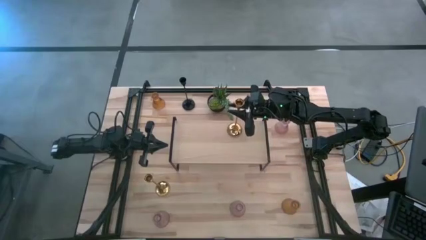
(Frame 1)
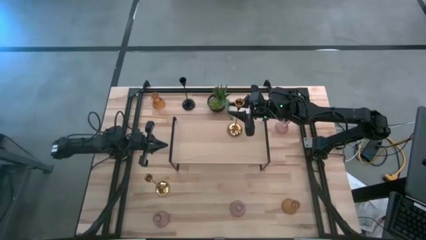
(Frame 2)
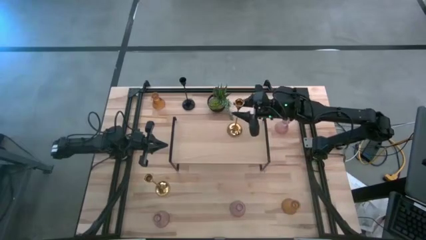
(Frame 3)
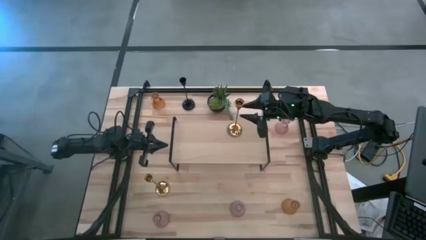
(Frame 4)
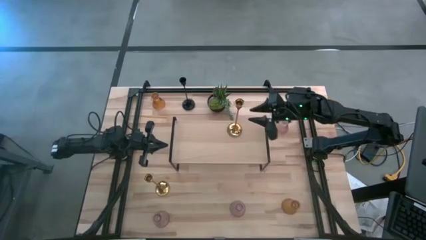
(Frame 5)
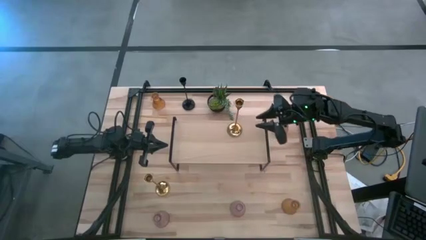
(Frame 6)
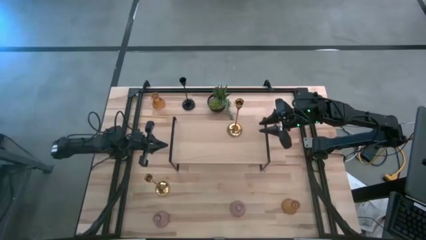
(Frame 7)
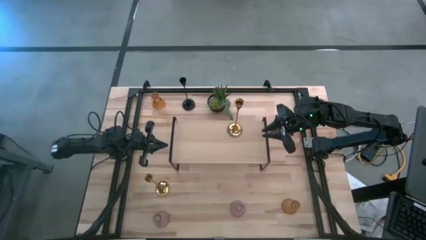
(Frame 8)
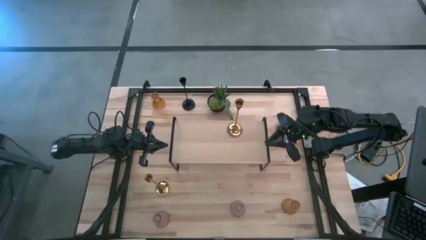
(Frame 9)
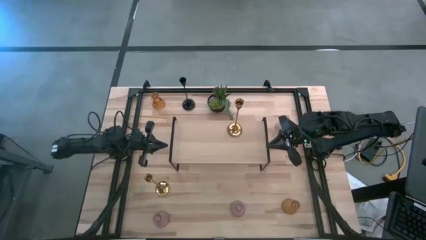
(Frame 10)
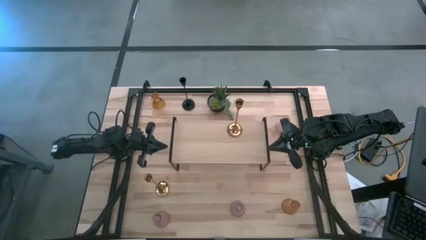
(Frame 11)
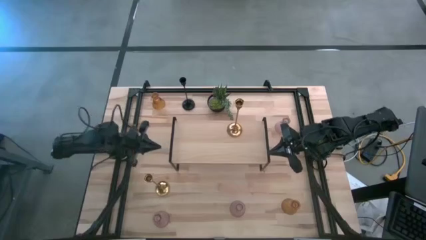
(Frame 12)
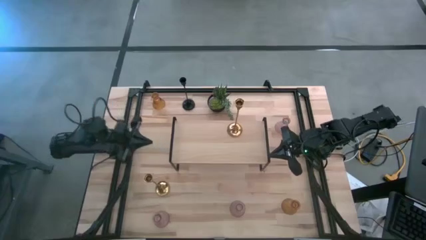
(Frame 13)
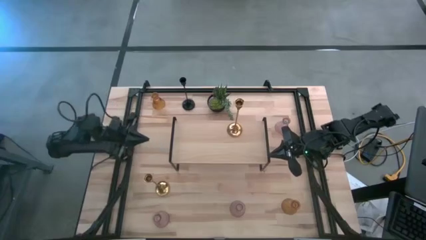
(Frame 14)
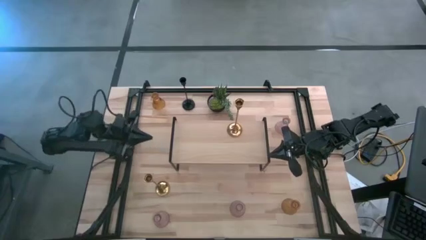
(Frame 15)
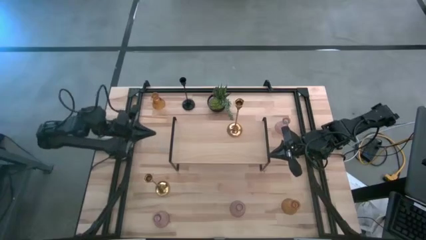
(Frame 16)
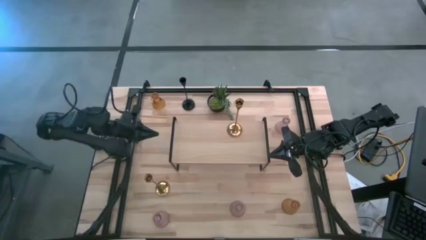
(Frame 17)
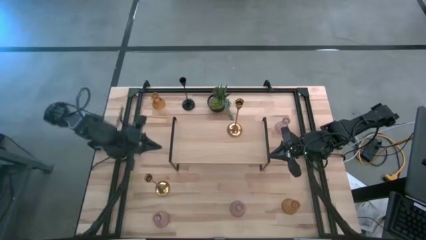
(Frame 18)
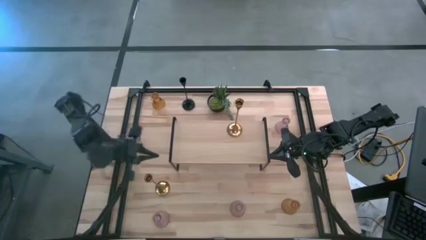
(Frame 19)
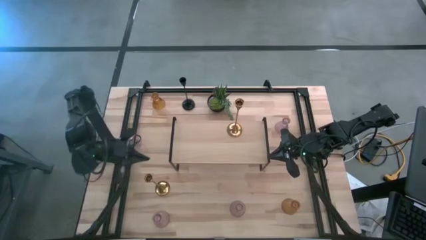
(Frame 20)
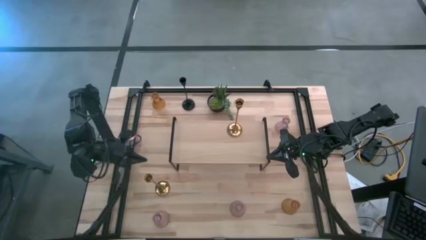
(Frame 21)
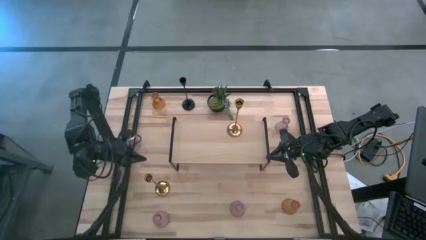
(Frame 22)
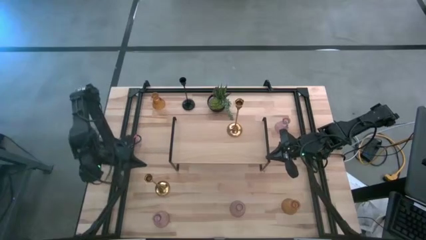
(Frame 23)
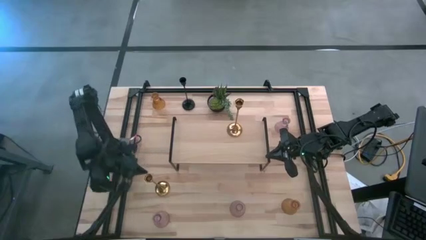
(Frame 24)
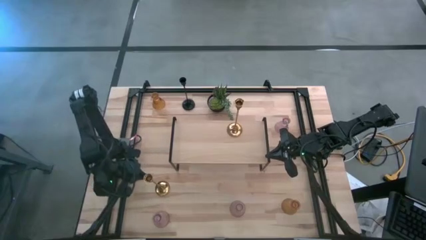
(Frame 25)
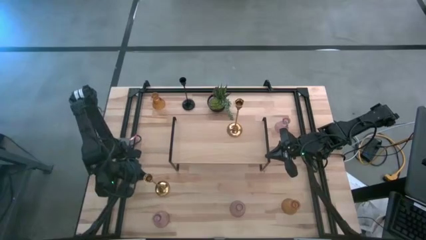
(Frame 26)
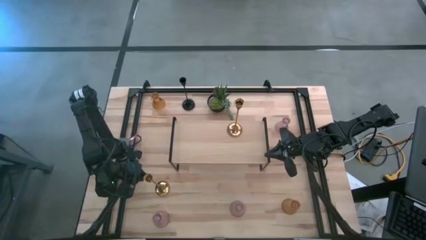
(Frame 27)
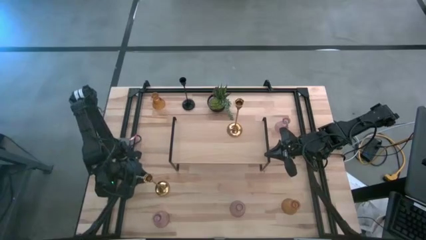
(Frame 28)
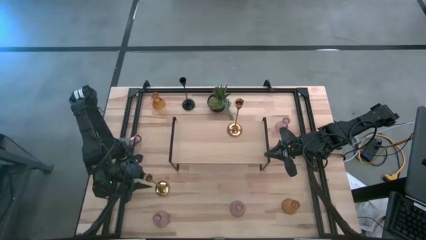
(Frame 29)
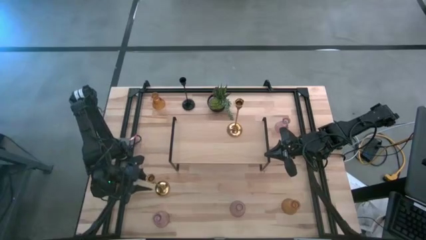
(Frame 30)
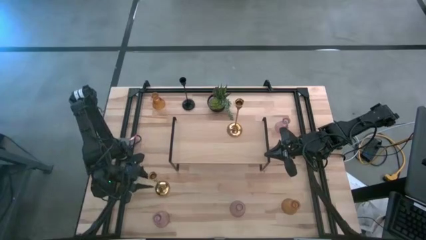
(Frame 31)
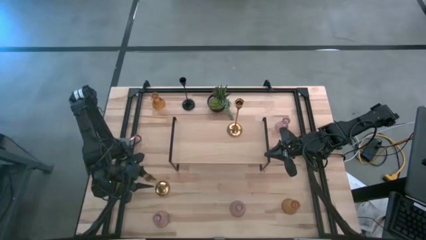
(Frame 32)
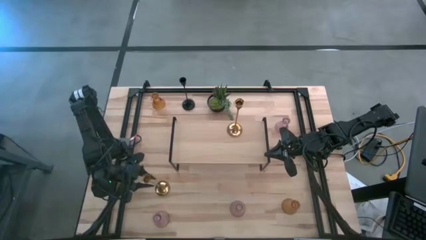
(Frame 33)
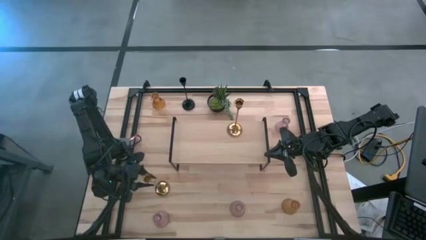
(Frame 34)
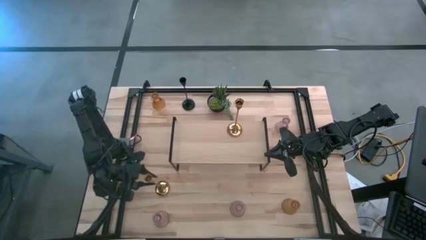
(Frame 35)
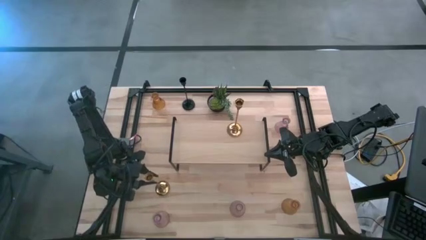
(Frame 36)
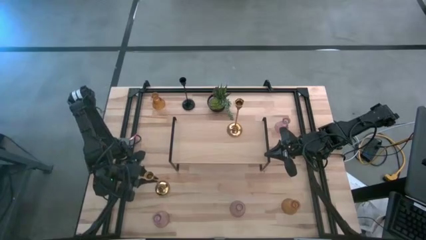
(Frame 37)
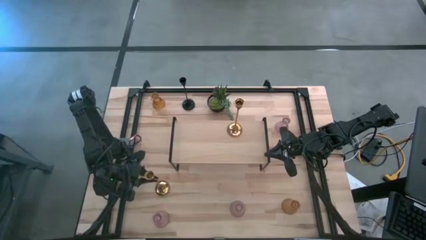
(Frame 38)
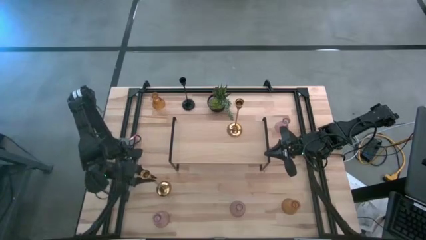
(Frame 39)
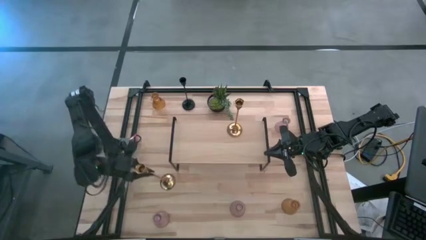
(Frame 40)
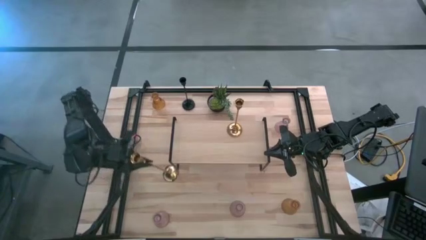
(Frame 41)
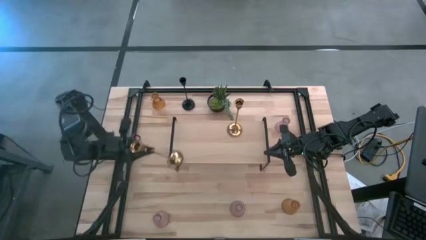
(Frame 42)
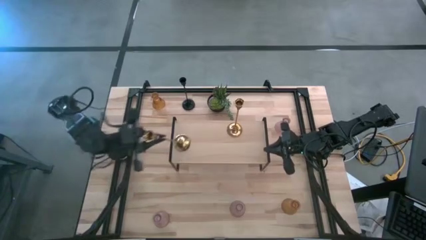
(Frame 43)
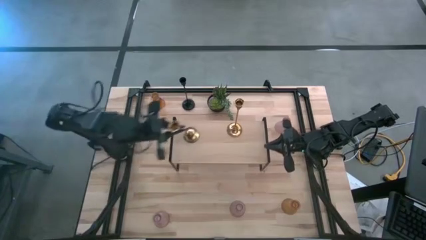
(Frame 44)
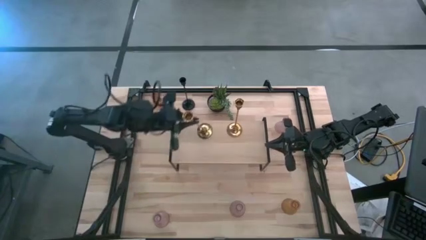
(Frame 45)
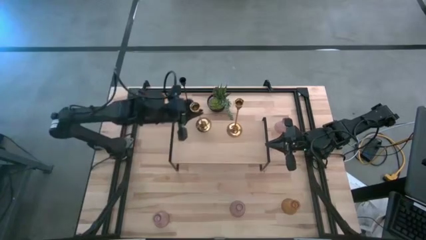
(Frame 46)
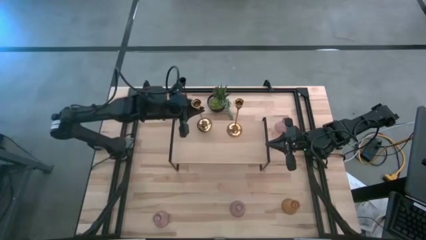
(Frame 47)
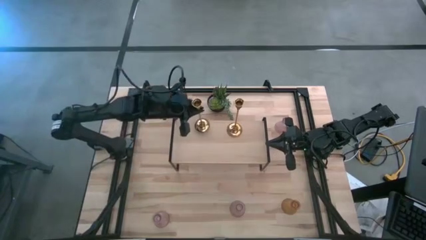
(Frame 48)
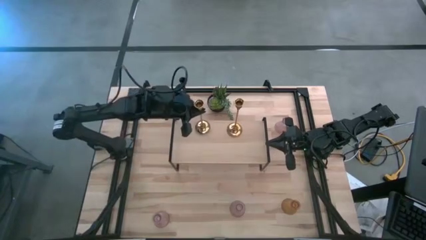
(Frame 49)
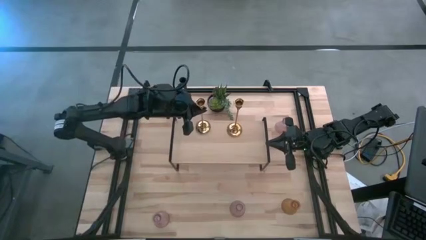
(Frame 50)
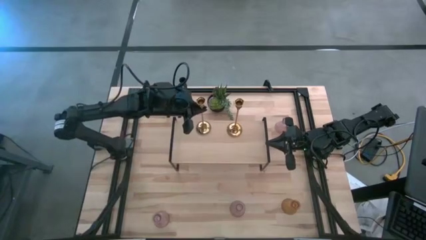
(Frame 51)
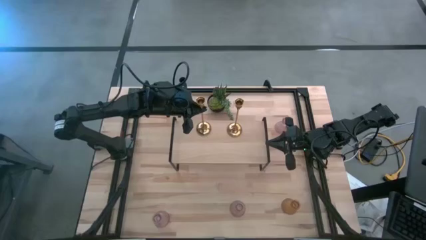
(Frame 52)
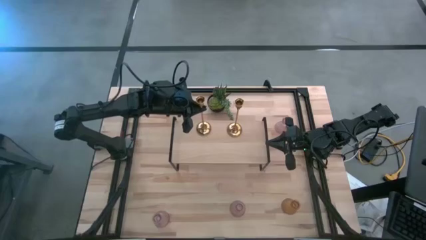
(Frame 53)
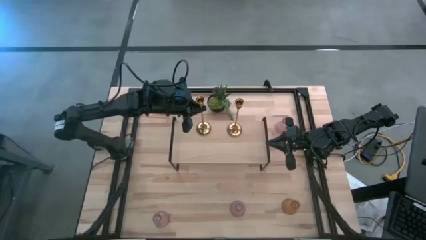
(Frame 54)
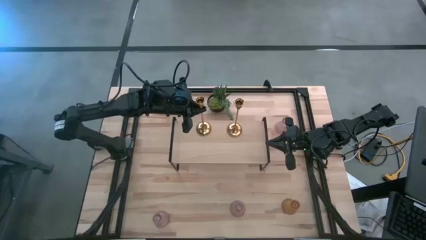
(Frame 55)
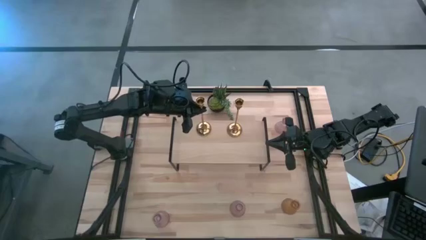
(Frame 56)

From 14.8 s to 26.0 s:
Task: Pick & Place candle stick holders
Put the gold candle holder on the shelf

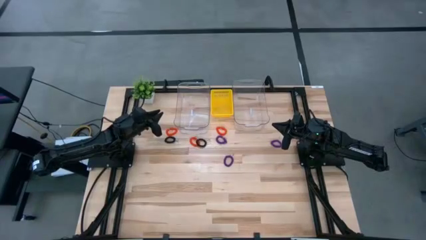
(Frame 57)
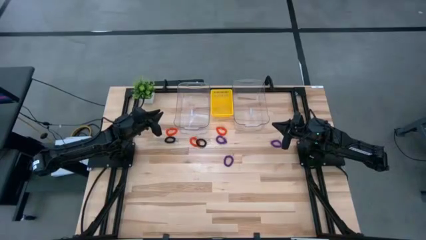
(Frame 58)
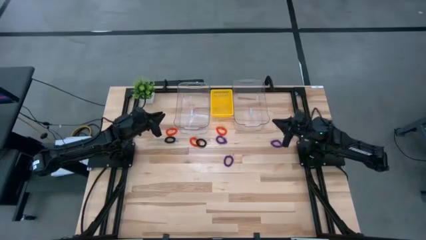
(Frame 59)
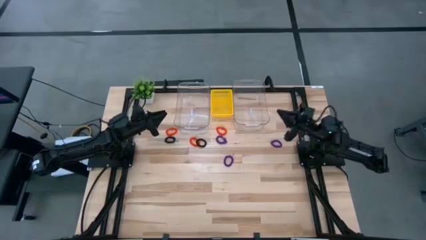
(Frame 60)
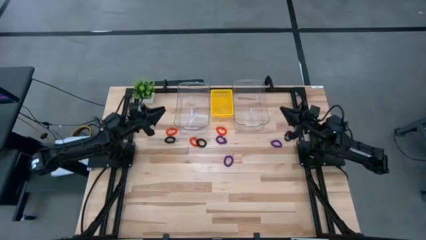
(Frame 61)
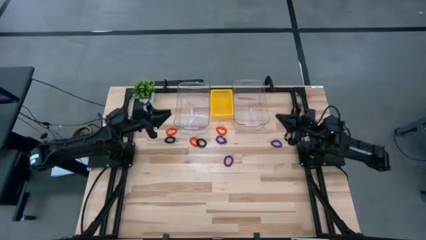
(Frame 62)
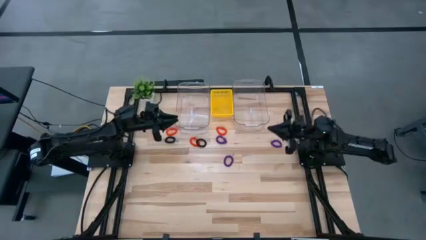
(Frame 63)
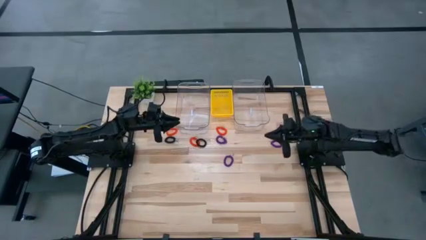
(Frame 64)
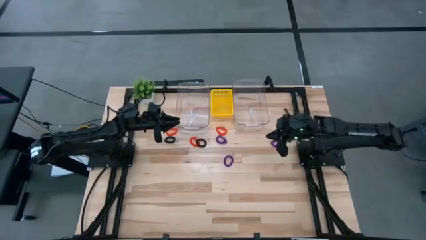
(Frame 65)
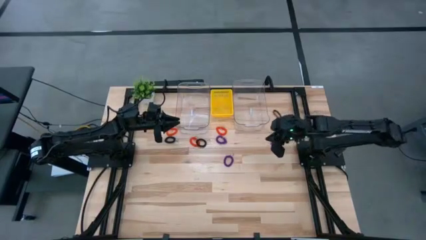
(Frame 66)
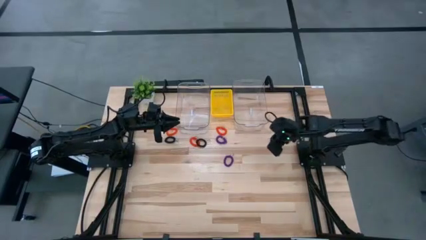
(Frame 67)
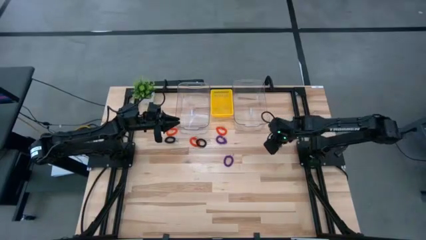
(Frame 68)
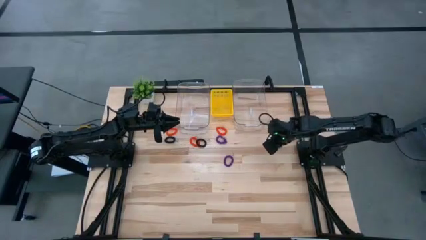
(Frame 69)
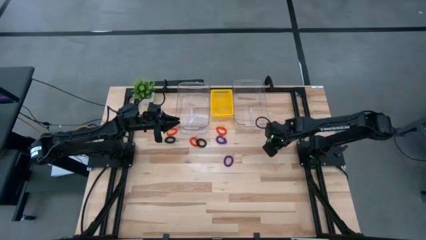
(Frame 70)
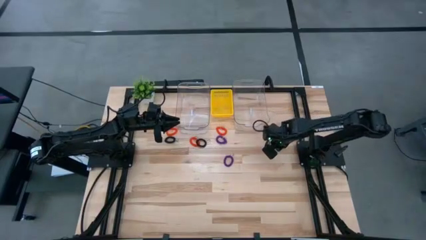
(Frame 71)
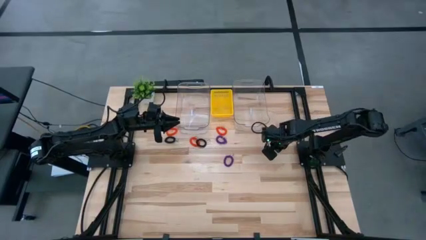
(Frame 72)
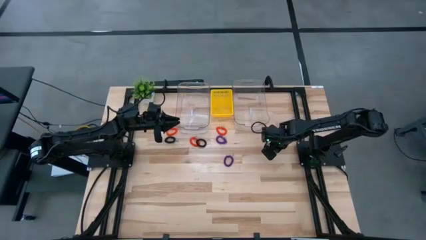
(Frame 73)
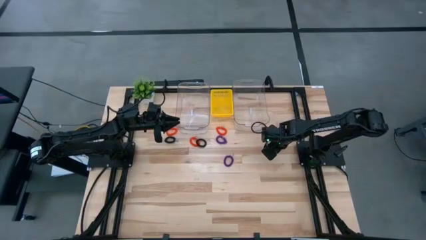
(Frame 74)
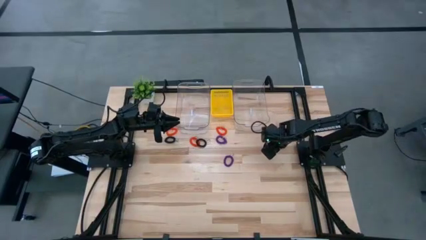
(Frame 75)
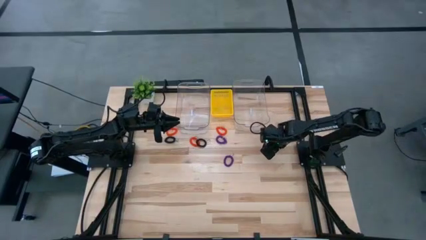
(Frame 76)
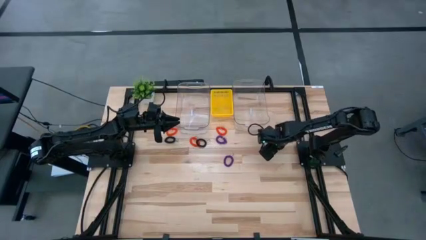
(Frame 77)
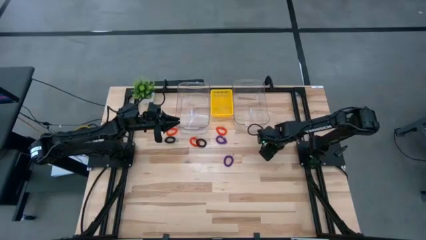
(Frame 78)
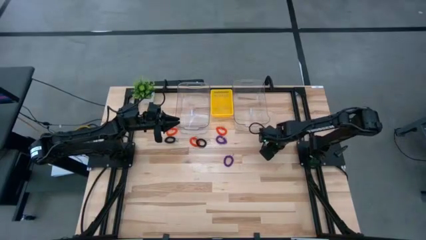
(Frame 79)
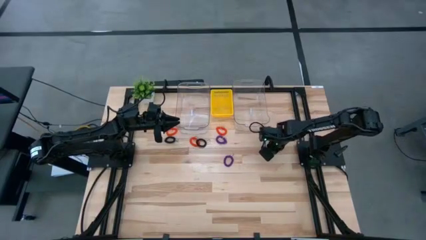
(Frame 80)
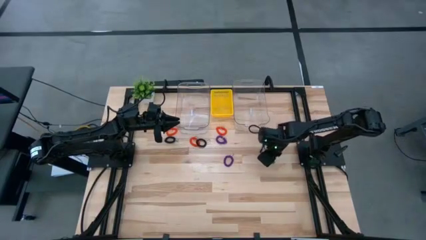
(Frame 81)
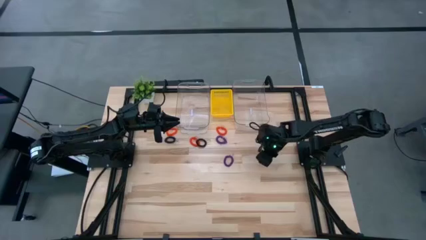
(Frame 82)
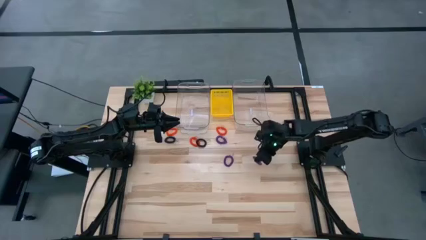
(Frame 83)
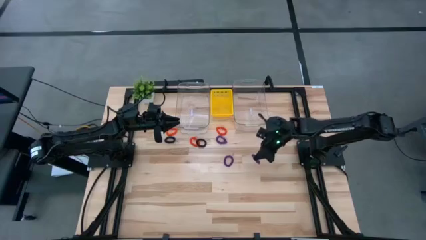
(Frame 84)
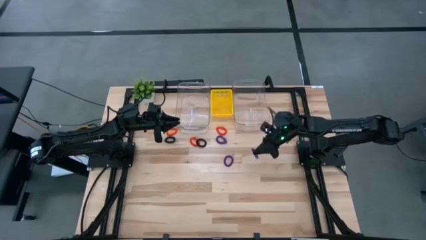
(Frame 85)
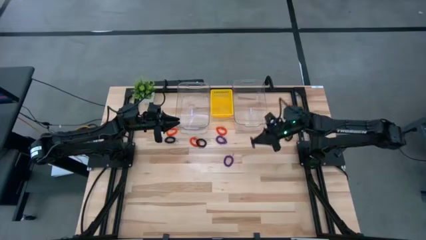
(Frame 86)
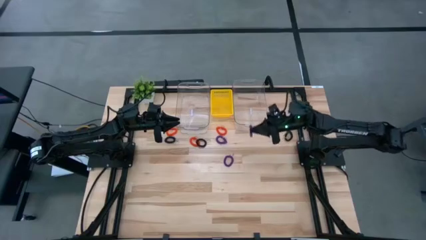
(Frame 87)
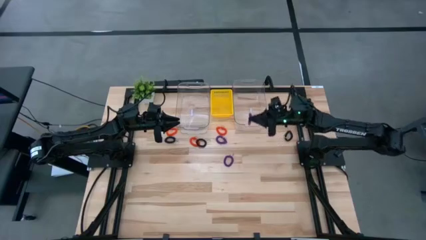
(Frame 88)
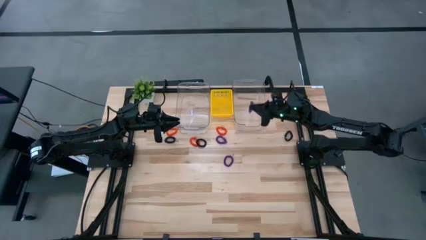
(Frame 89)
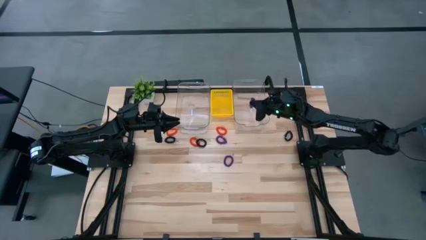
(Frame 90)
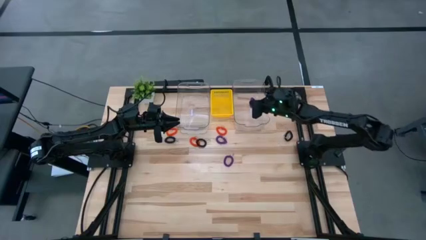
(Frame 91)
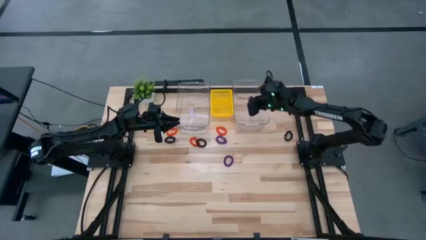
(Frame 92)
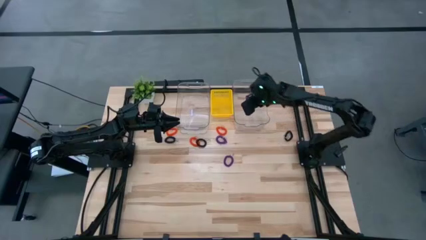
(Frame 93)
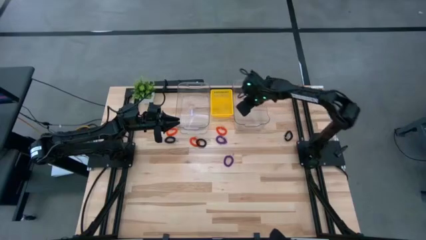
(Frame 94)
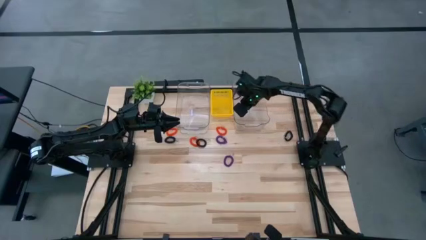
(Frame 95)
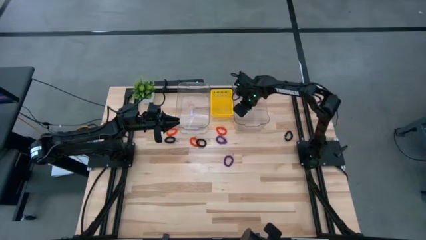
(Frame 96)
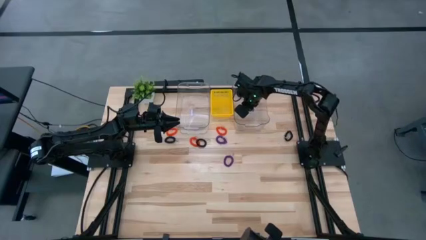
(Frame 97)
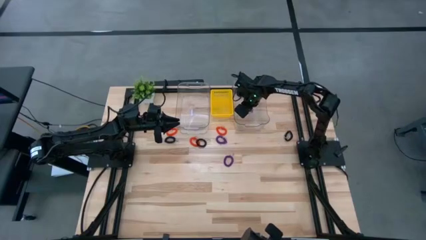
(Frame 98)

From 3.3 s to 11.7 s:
Task: Sort spring keychains
Put the top right purple spring keychain into the right transparent bin
